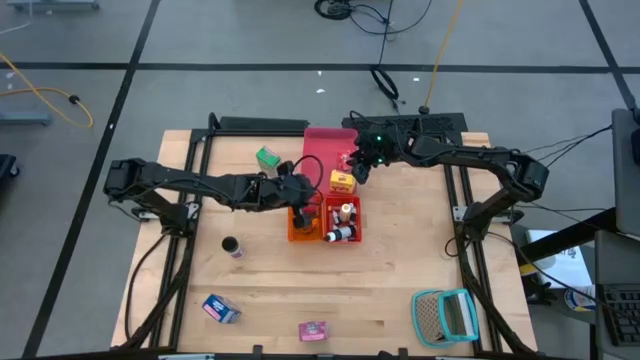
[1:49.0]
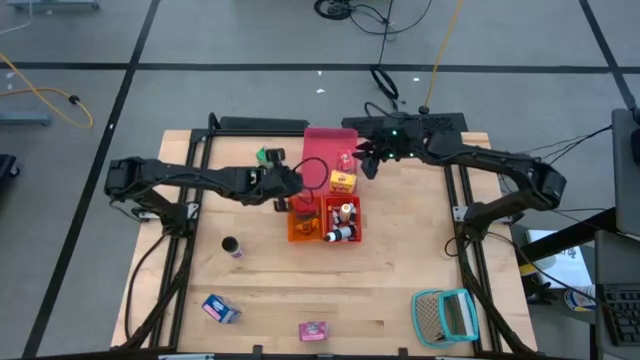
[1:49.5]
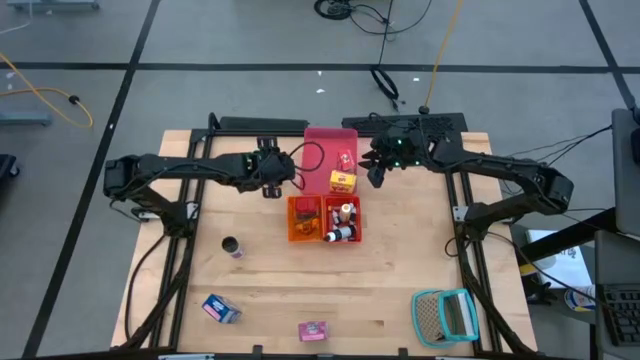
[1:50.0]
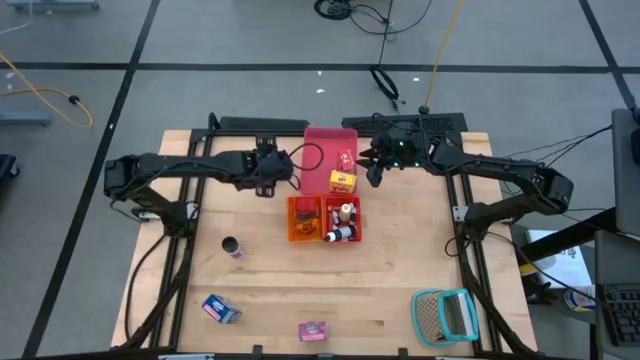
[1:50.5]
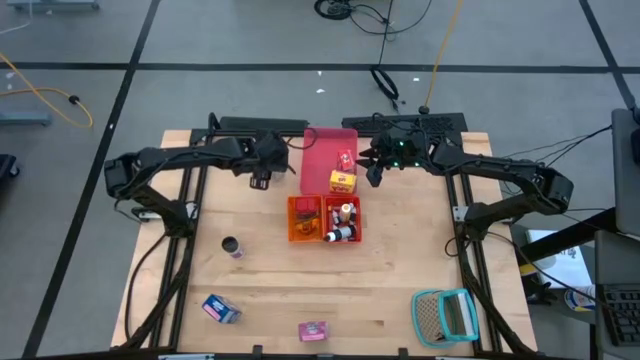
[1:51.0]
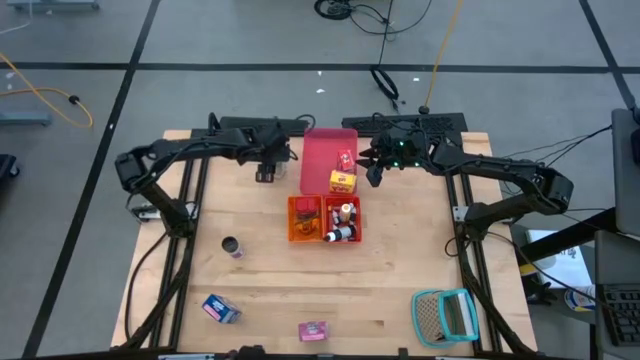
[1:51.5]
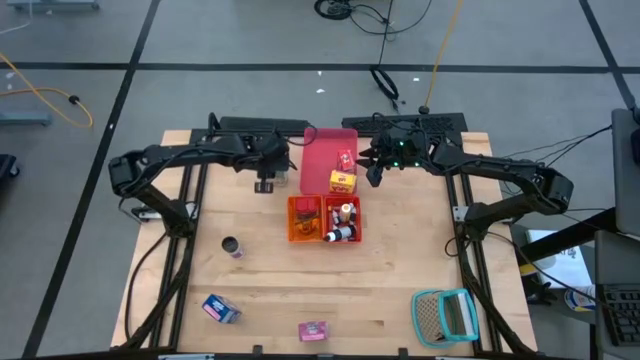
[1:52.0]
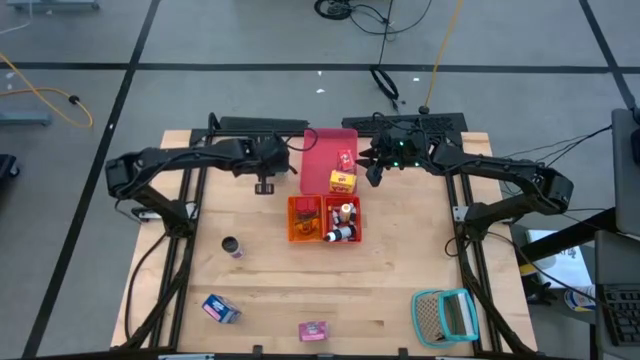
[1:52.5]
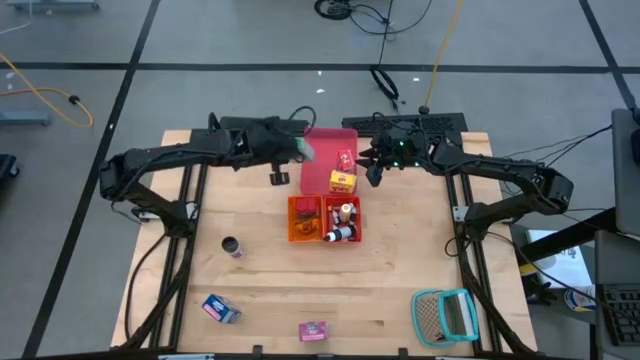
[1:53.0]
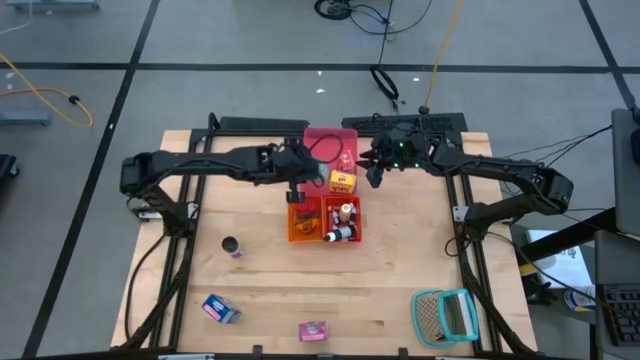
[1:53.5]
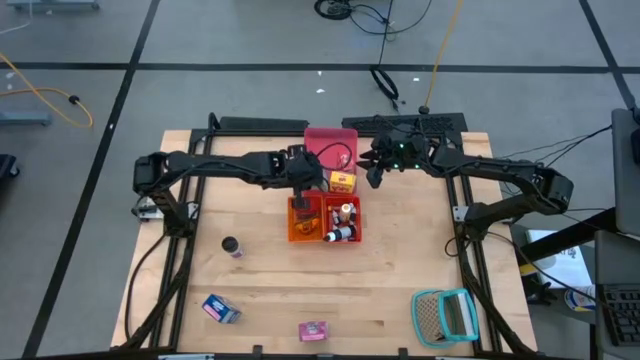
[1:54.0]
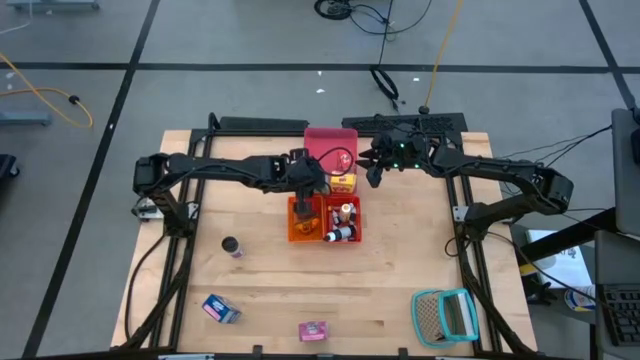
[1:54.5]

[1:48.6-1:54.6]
Task: Pick & Place Kitchen Items
Put the green cereal box into the pink bin

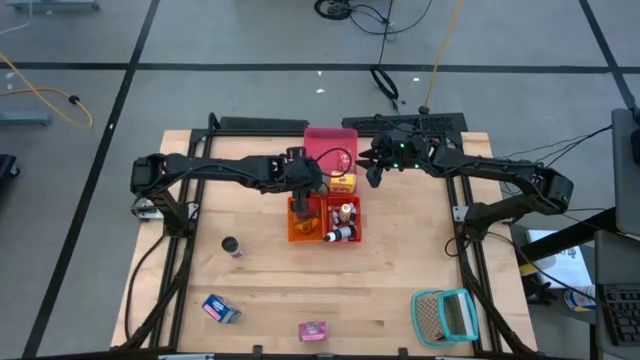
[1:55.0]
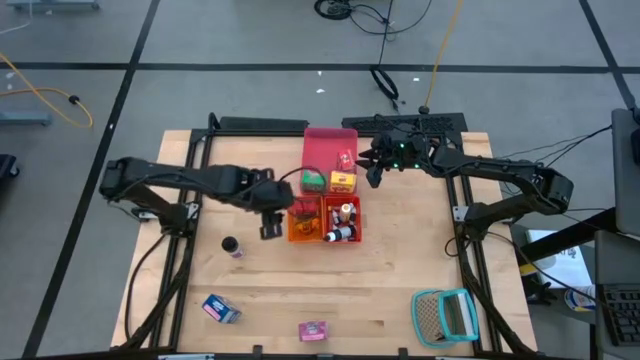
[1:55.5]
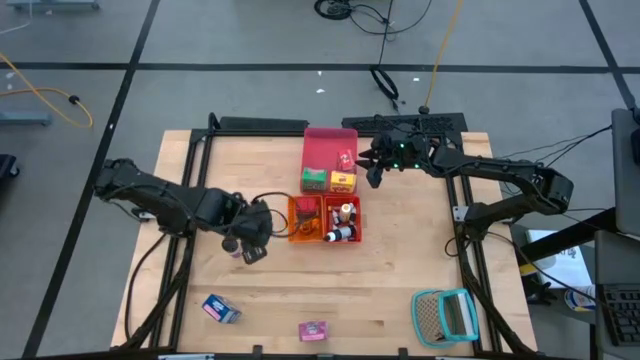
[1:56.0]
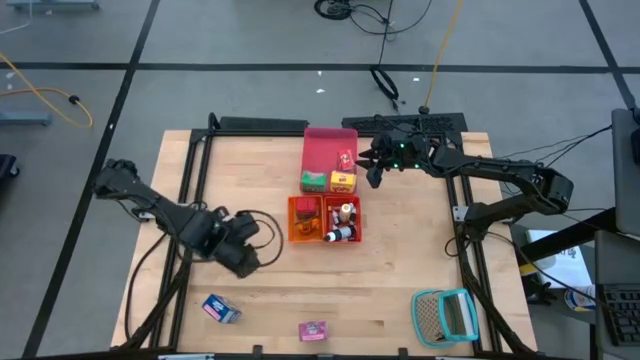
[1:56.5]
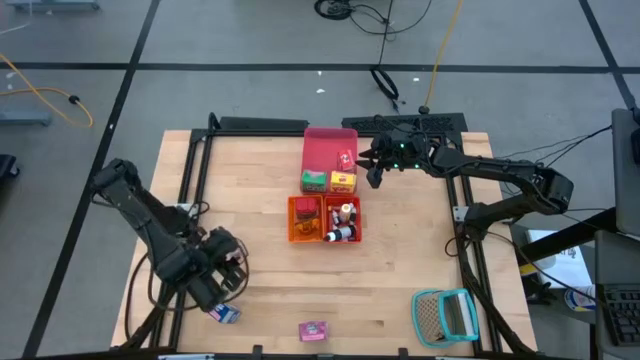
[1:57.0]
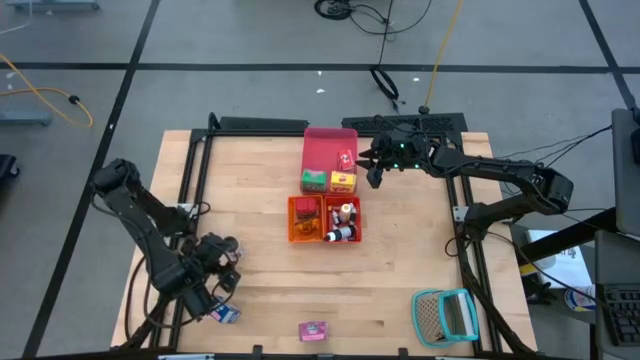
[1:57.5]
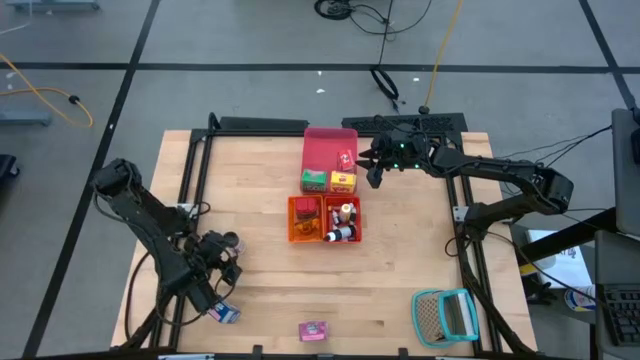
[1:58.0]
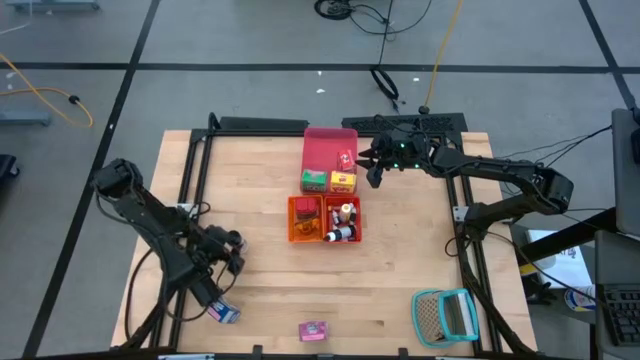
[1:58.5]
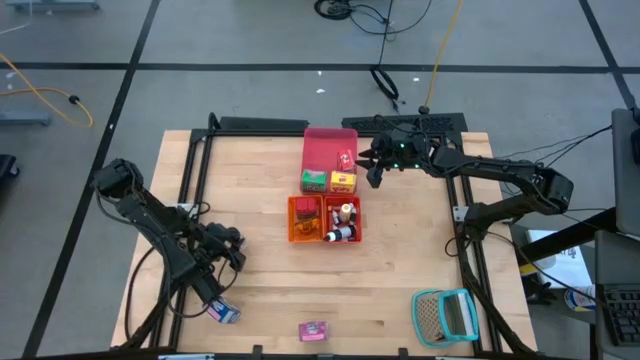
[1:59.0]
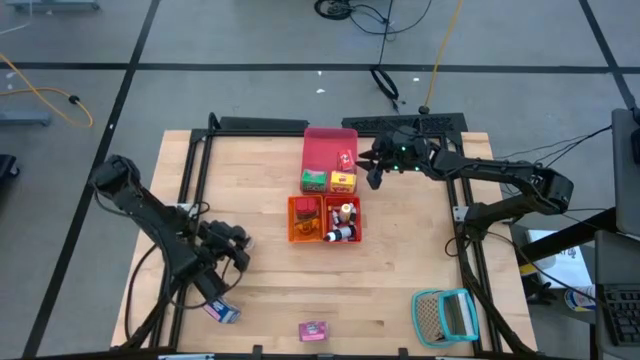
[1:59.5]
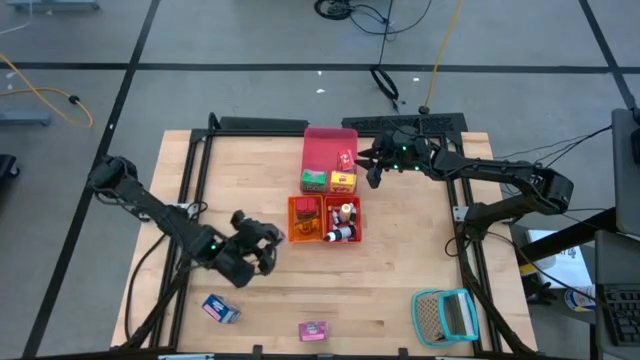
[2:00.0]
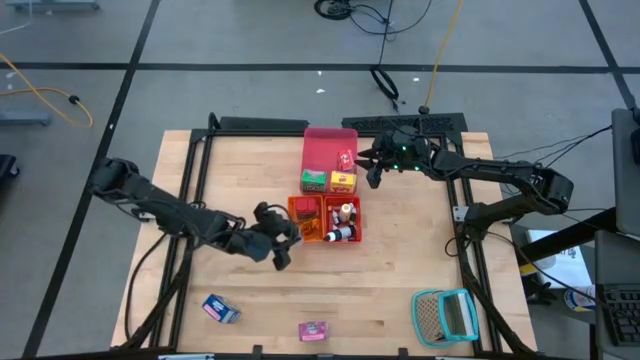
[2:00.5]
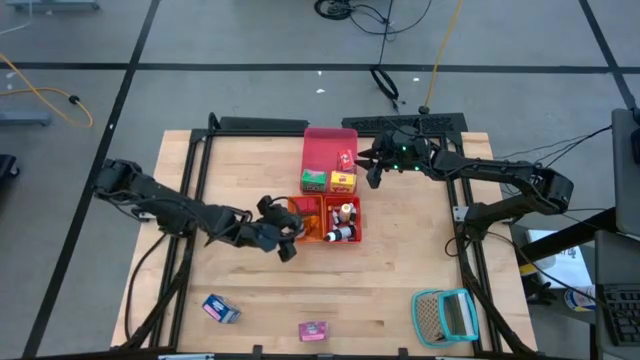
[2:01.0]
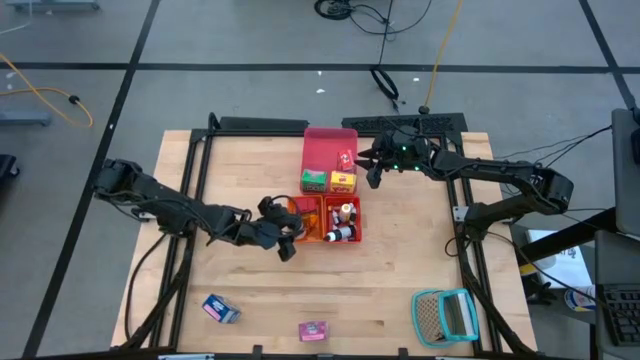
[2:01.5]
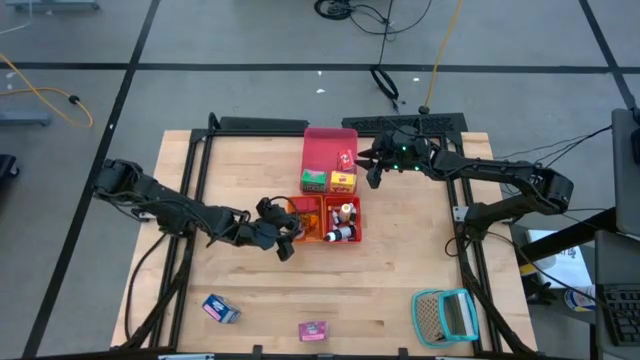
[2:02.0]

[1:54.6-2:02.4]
Put the black spice bottle into the orange basket

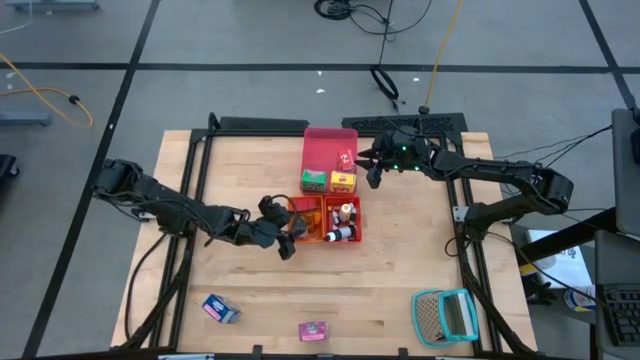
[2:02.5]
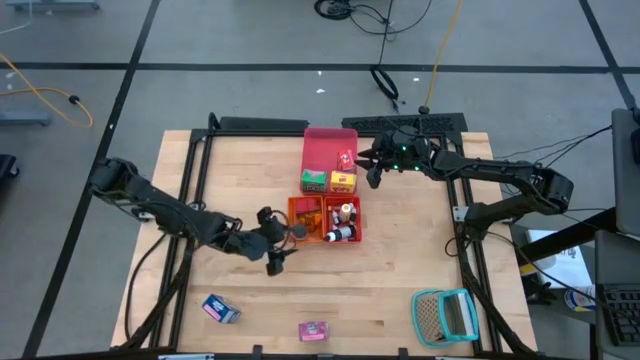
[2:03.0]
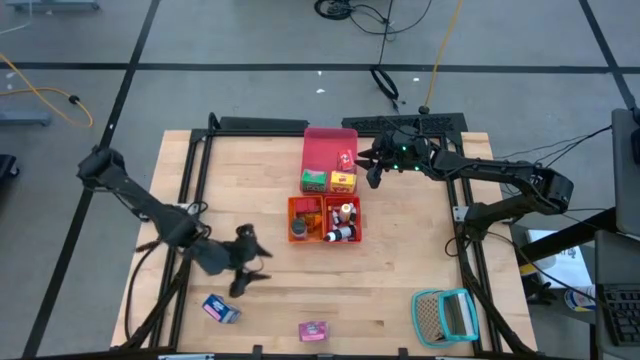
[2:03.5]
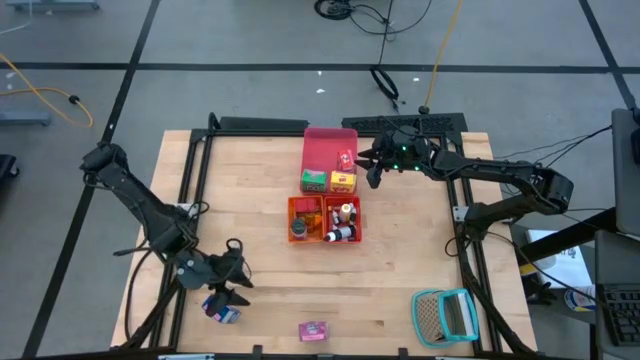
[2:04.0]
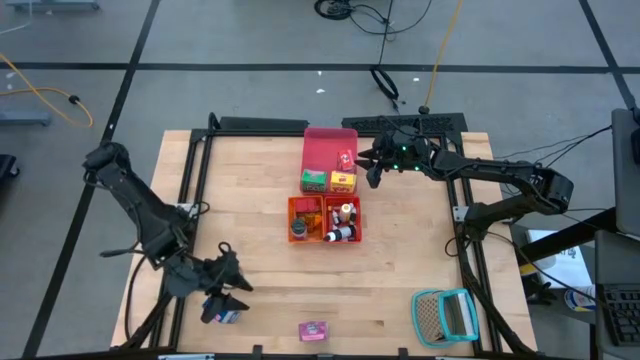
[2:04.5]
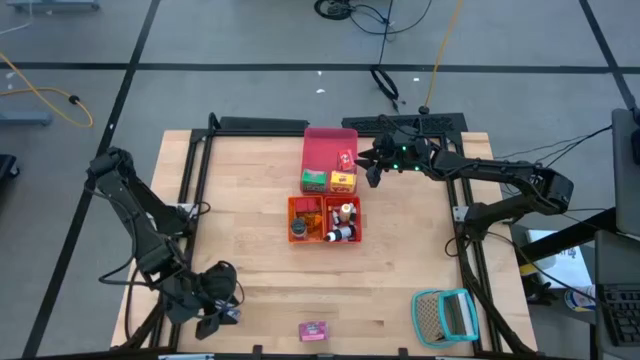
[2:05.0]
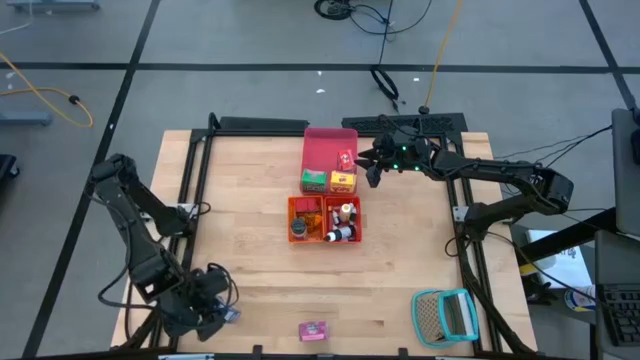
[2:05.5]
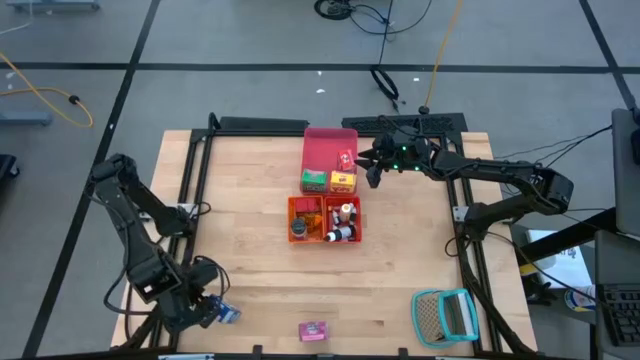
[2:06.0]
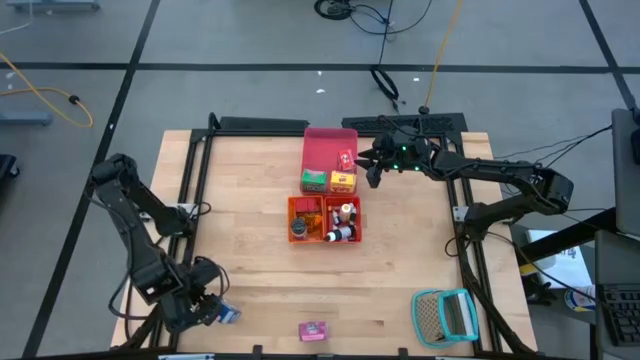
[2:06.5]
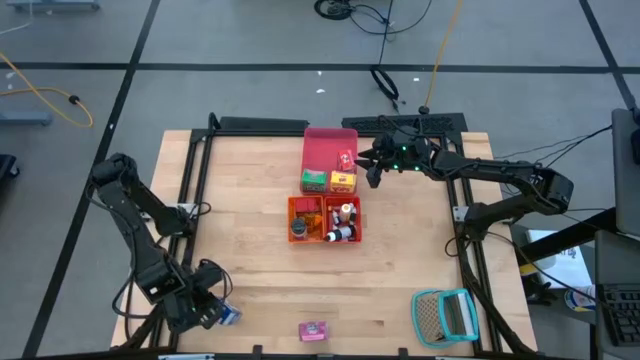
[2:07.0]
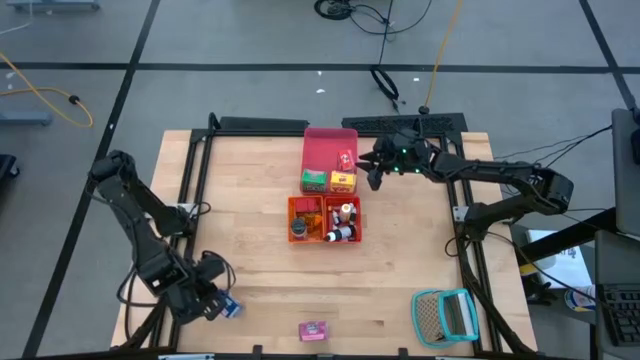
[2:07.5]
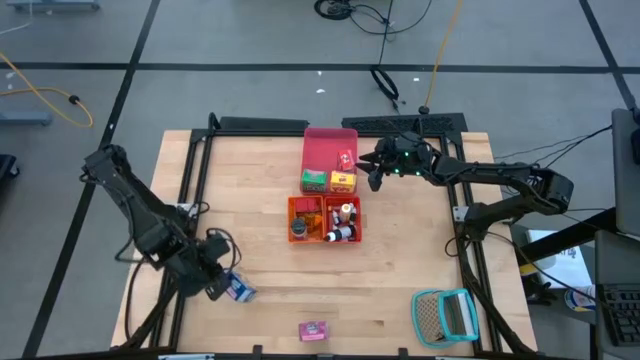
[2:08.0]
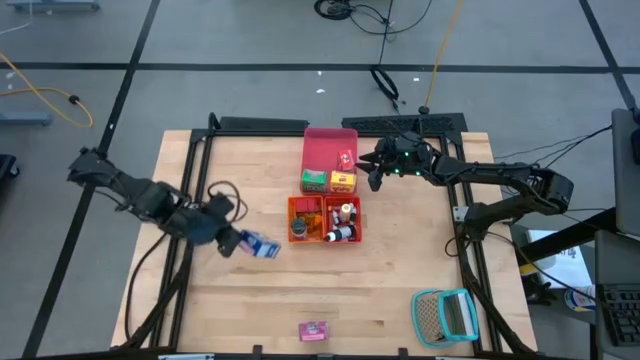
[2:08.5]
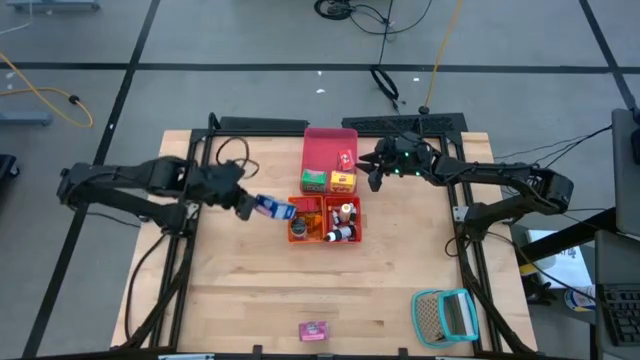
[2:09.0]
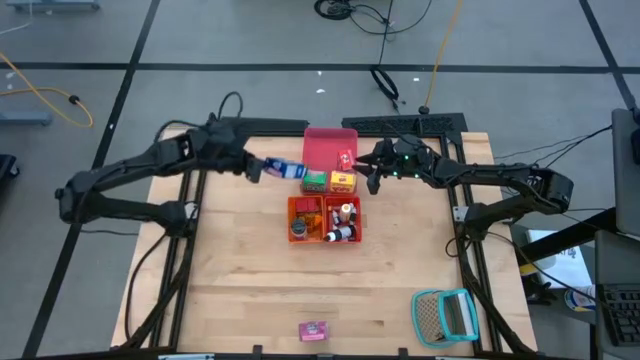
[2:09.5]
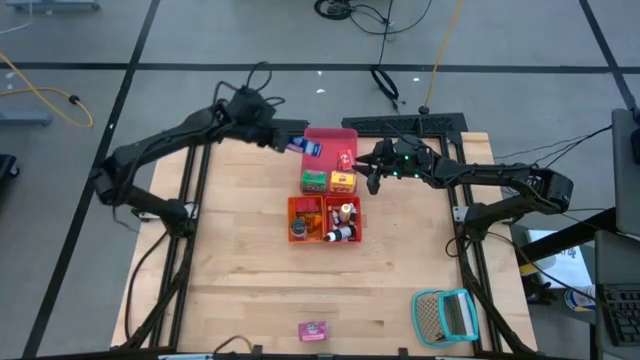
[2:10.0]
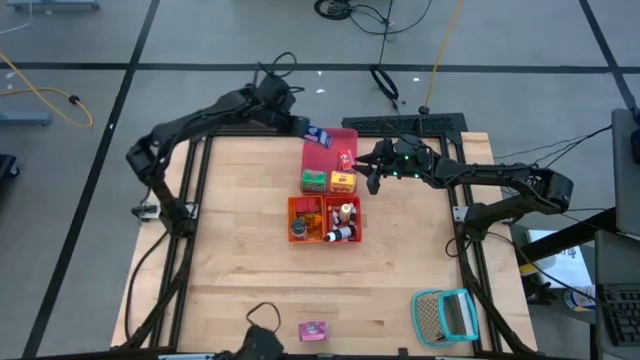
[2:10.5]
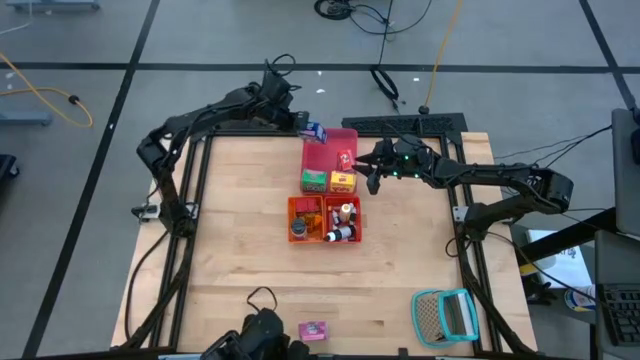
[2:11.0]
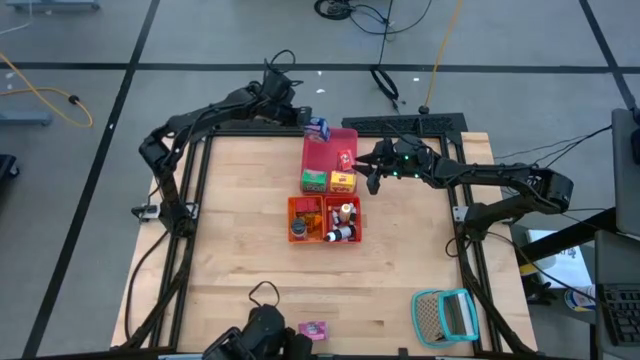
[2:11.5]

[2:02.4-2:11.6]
Put the blue cereal box into the pink bin
